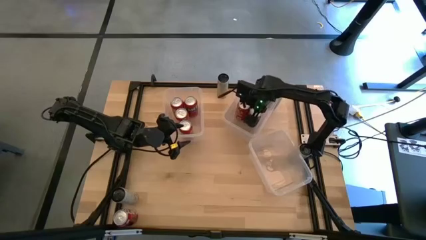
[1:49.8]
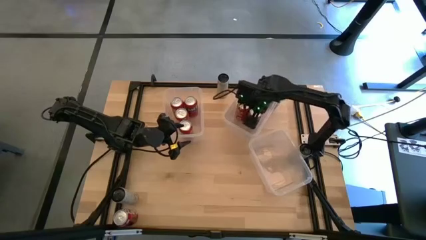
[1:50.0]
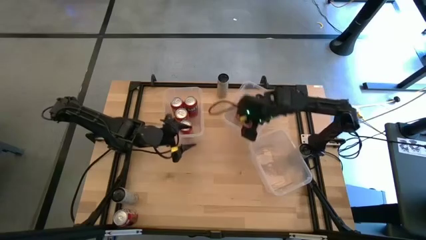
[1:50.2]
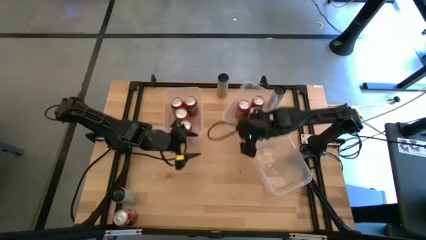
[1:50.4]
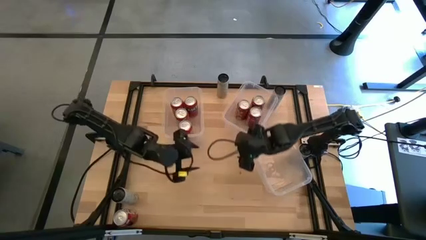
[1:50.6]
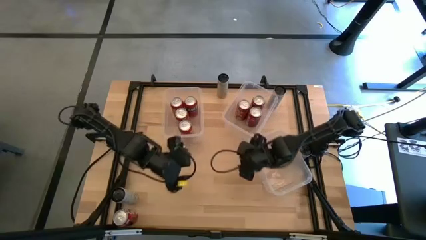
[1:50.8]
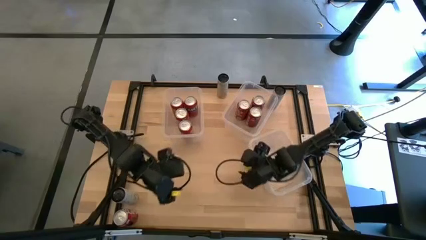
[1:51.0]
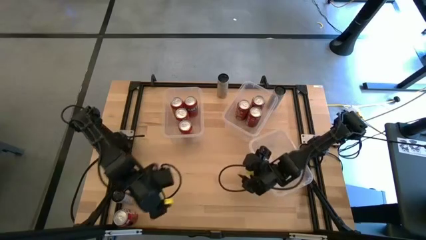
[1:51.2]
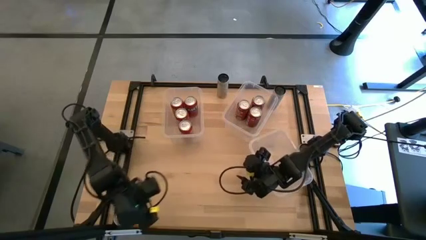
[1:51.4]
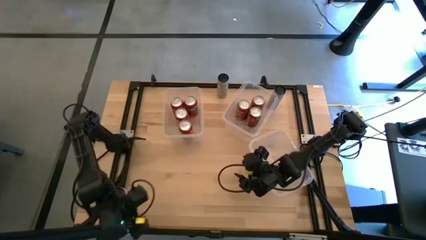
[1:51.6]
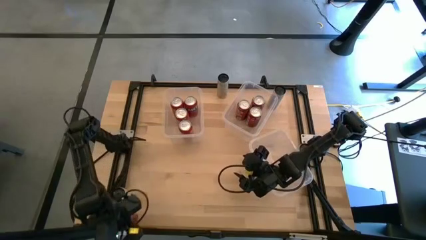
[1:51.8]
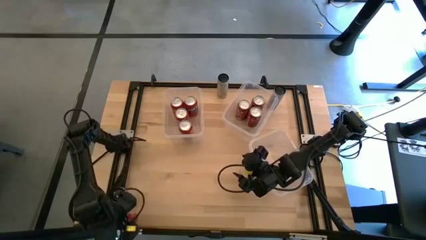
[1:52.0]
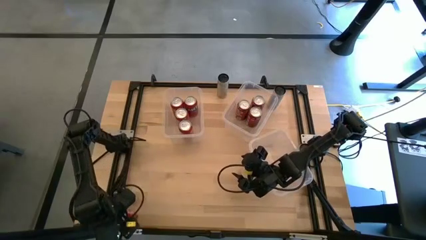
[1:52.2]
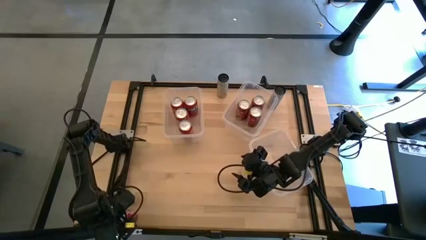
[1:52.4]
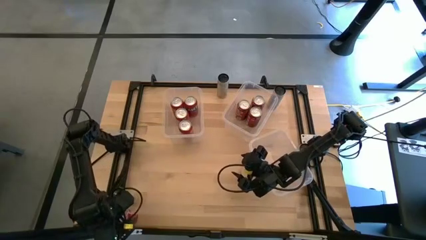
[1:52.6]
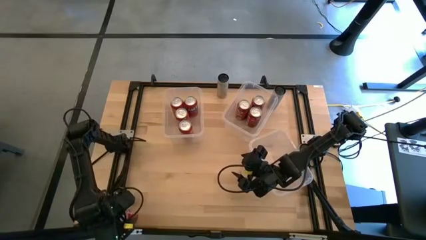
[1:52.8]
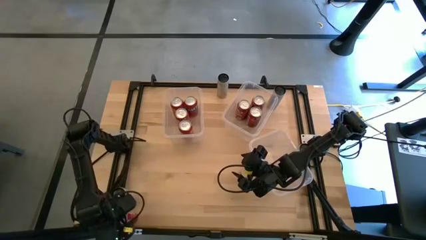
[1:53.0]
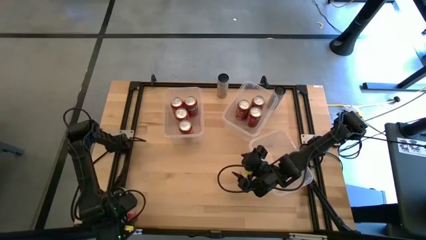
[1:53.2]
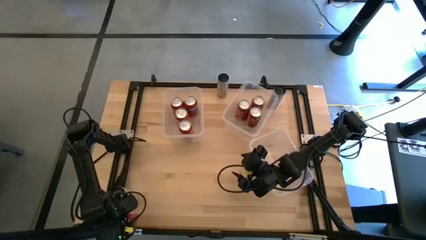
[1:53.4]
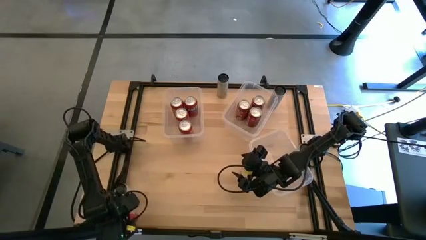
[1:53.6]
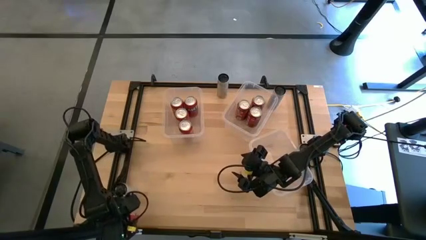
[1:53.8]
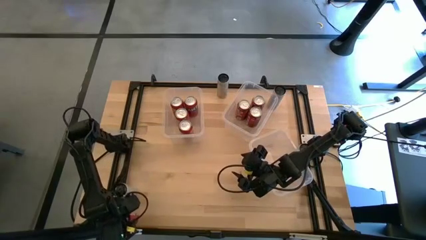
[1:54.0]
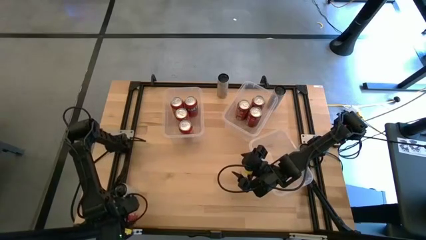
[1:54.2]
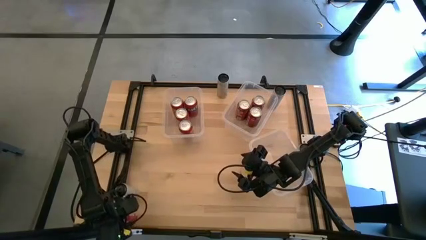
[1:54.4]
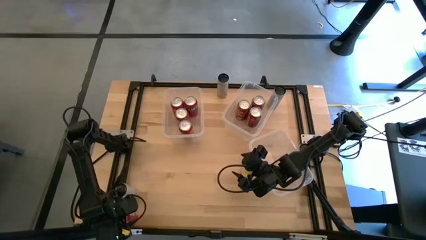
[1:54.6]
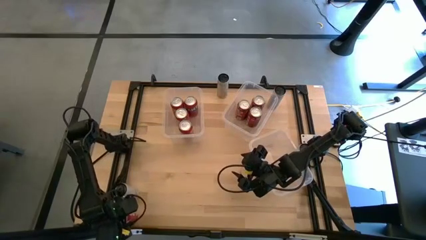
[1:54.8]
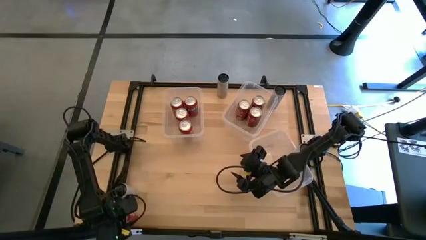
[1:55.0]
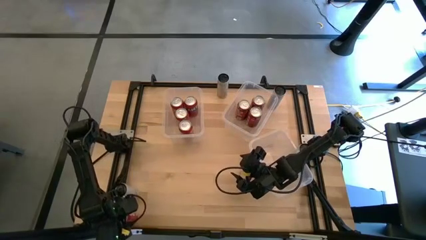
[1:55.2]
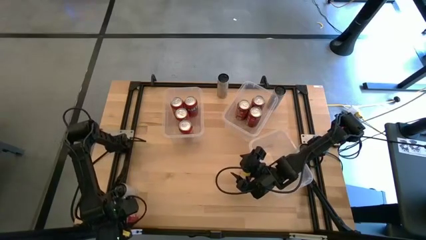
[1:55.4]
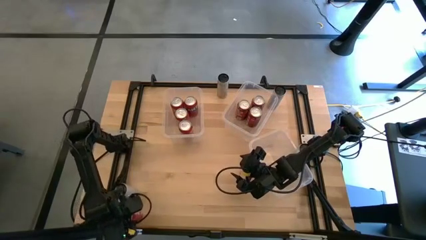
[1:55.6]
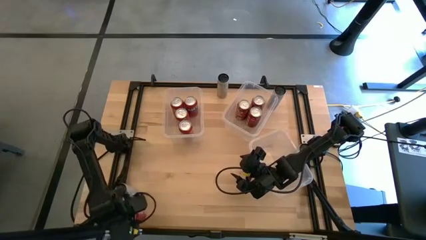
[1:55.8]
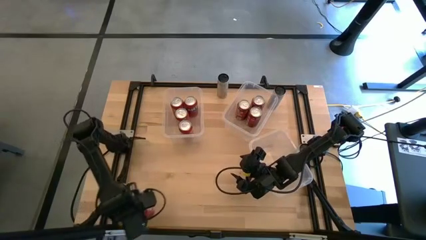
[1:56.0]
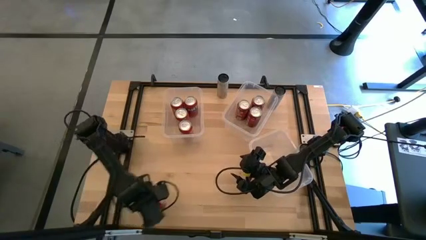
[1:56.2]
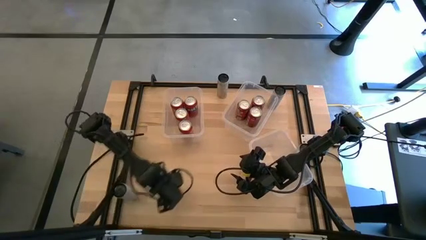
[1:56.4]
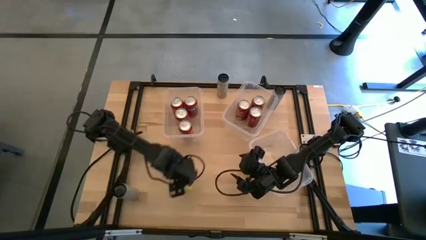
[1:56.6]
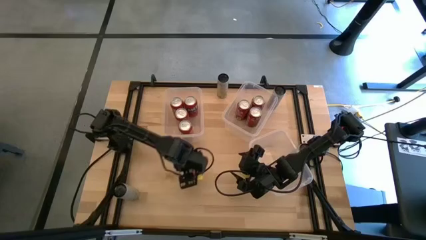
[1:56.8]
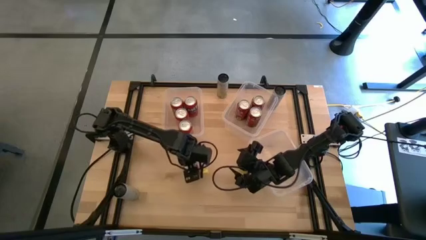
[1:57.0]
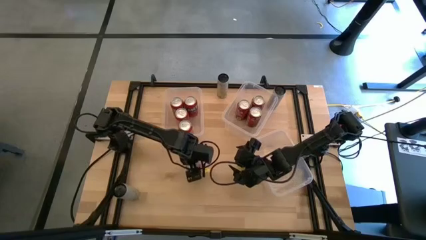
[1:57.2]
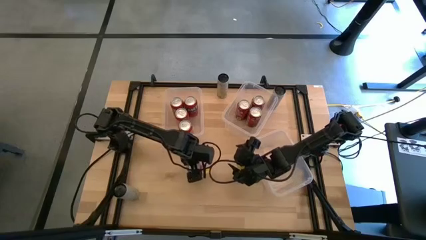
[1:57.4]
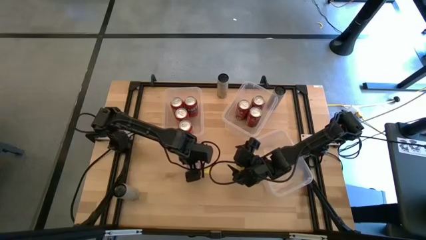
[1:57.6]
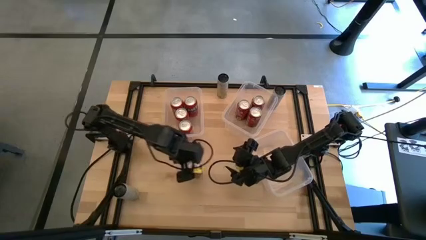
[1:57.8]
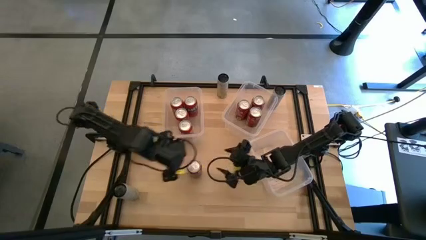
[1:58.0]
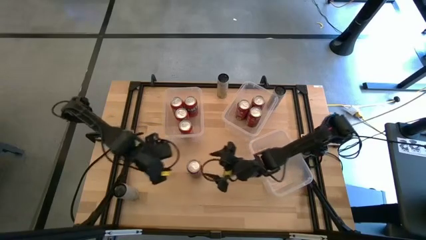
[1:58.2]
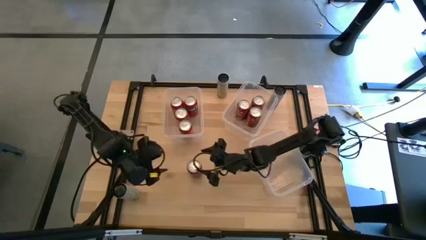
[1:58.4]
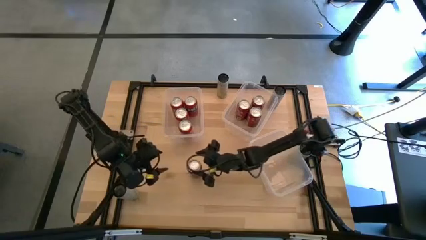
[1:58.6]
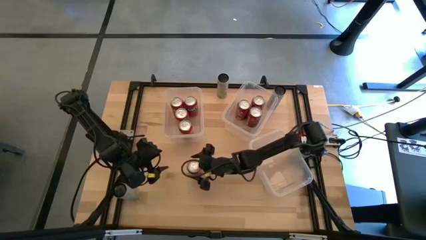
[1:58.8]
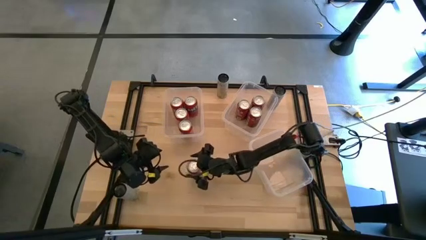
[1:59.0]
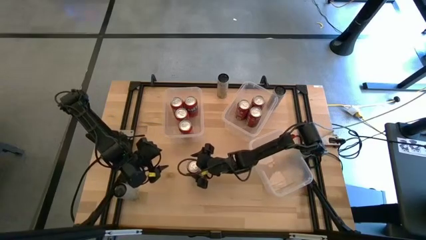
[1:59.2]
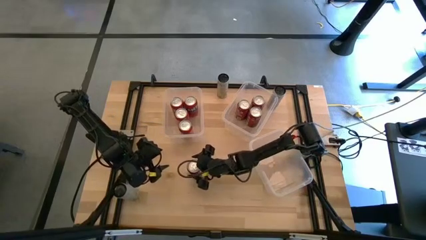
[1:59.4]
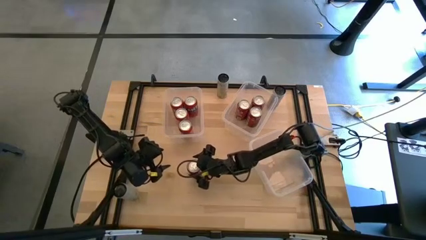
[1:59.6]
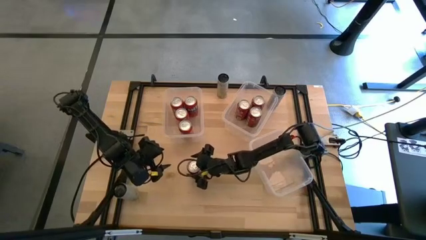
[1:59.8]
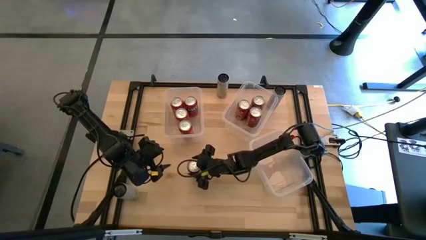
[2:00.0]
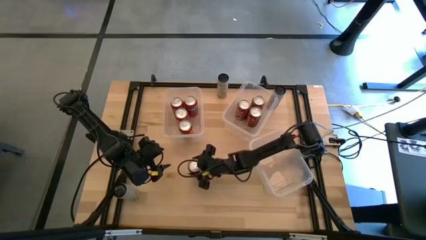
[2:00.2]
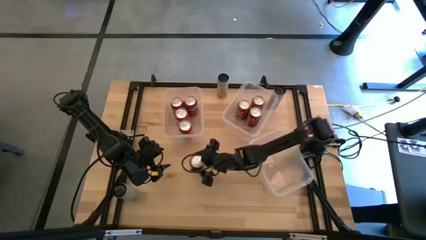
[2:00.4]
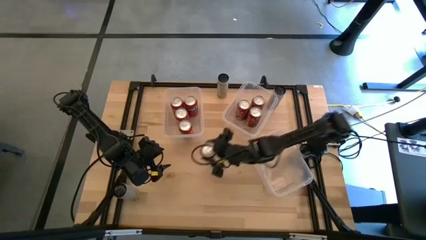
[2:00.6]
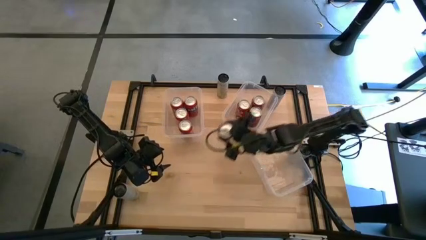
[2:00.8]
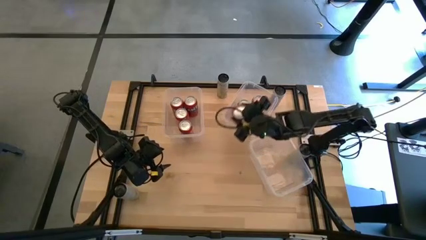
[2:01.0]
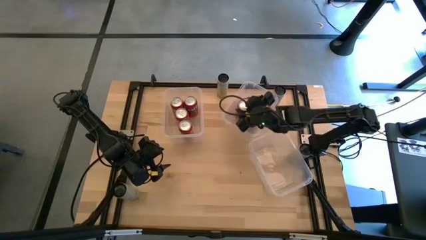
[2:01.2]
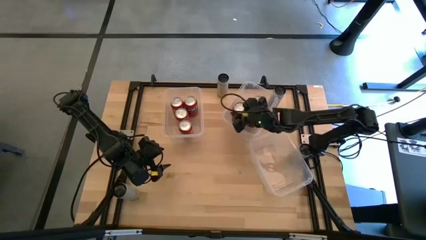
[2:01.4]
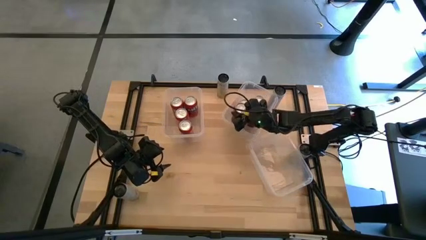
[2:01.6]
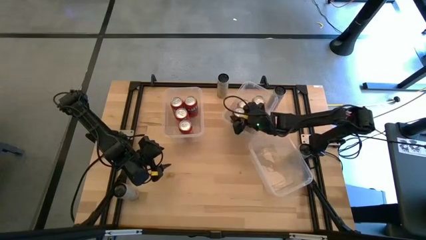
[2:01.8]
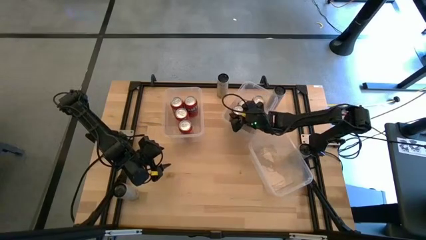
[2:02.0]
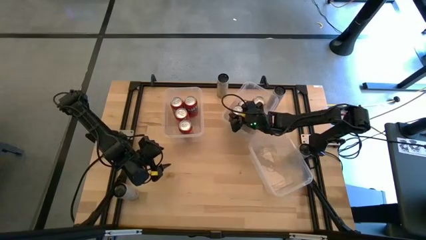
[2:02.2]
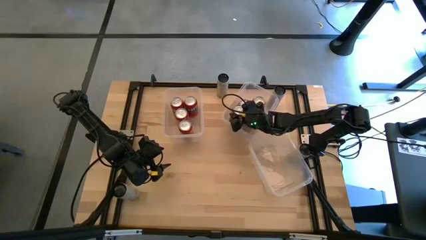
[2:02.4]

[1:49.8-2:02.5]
Task: Sort soda cans
Put the red-white soda can into the top right transparent bin

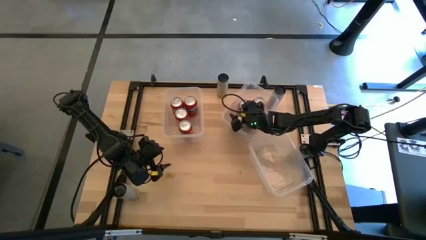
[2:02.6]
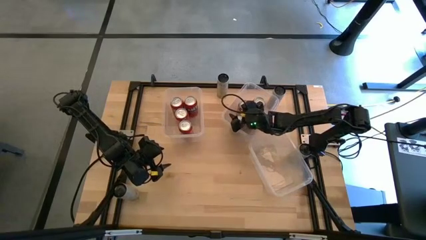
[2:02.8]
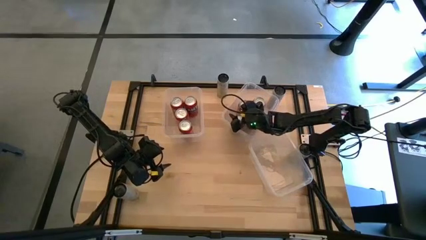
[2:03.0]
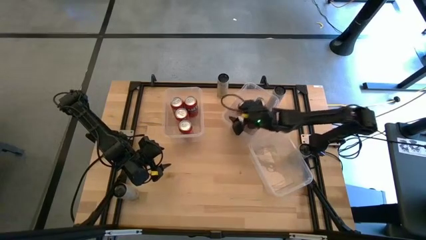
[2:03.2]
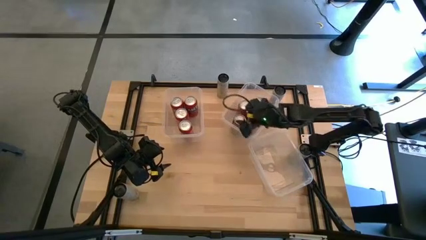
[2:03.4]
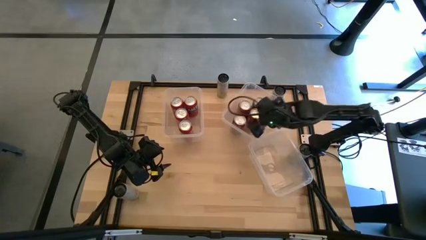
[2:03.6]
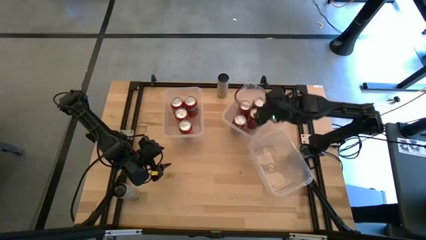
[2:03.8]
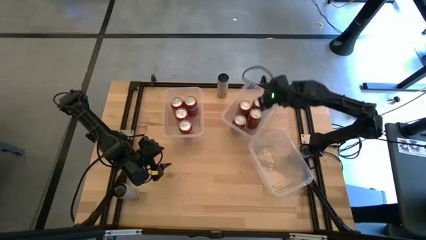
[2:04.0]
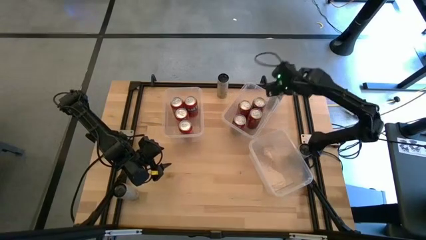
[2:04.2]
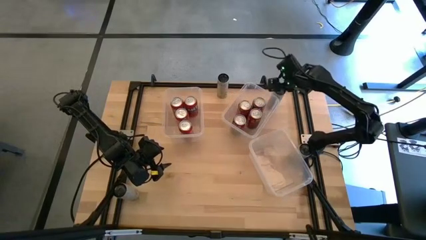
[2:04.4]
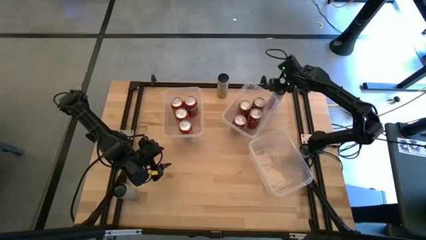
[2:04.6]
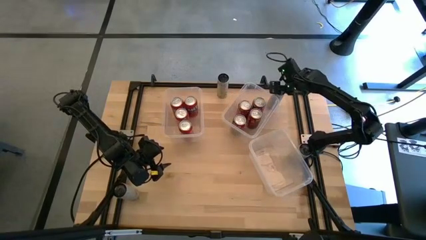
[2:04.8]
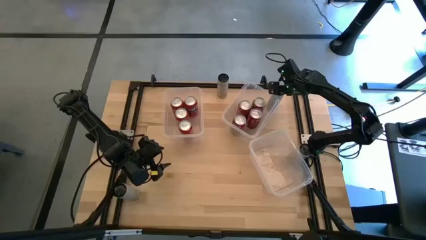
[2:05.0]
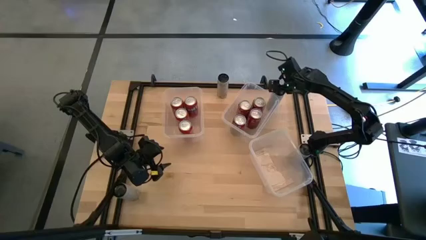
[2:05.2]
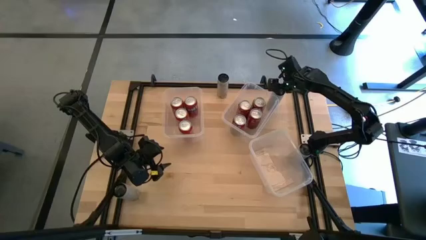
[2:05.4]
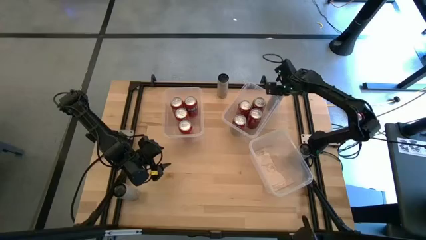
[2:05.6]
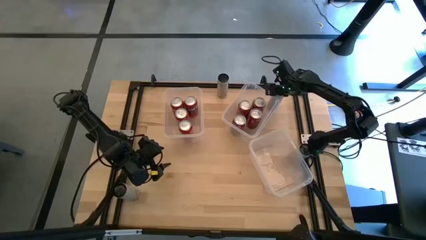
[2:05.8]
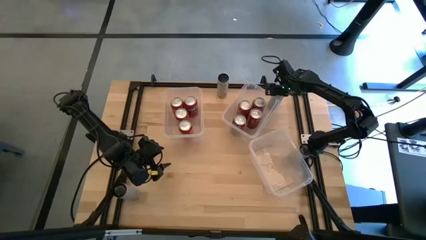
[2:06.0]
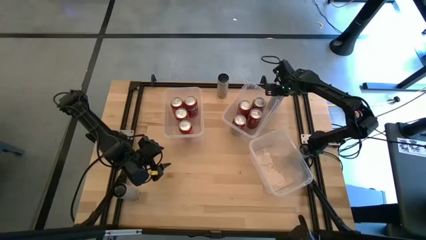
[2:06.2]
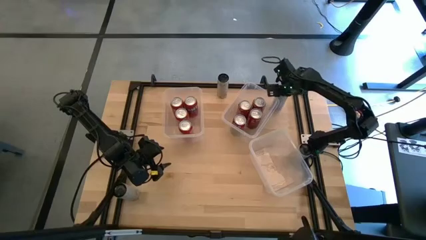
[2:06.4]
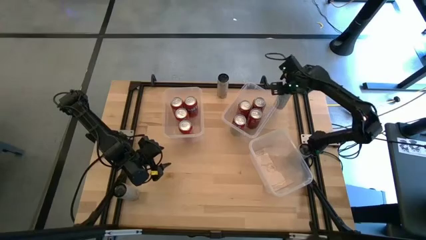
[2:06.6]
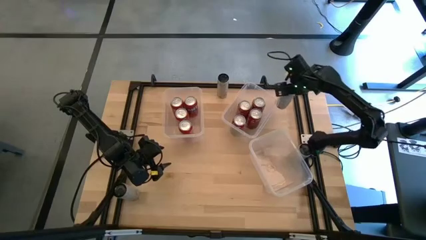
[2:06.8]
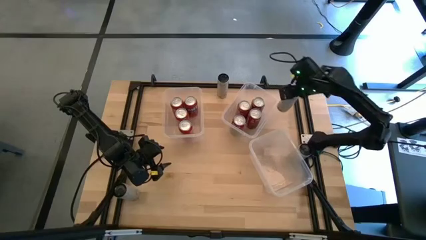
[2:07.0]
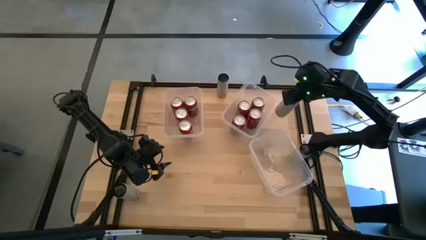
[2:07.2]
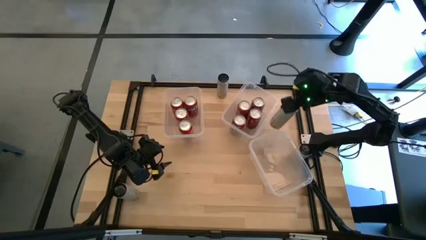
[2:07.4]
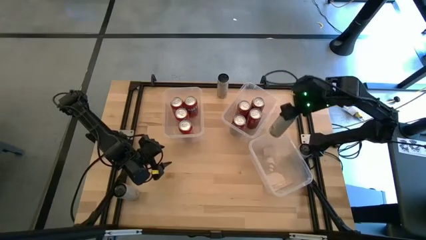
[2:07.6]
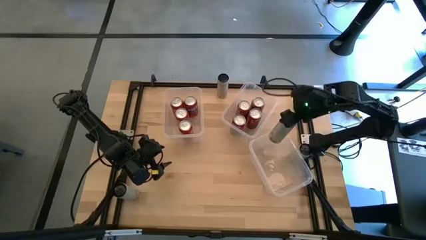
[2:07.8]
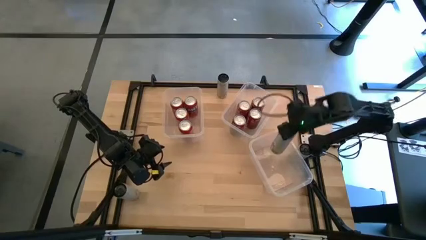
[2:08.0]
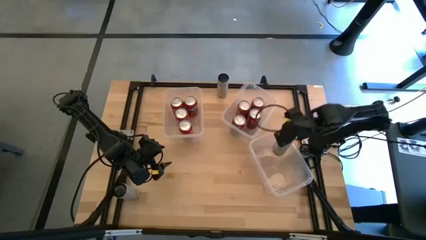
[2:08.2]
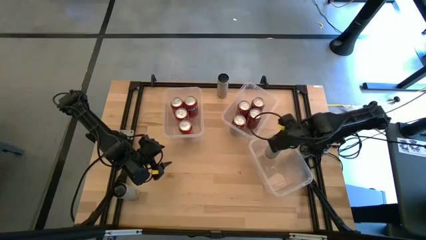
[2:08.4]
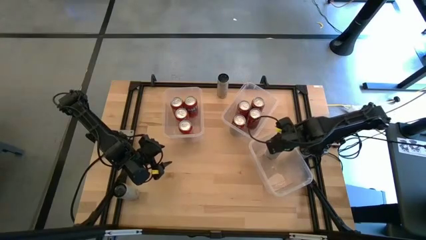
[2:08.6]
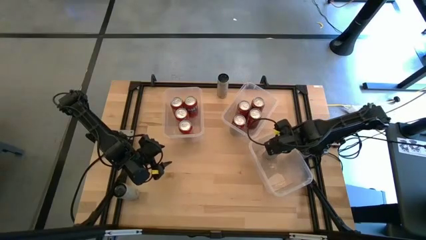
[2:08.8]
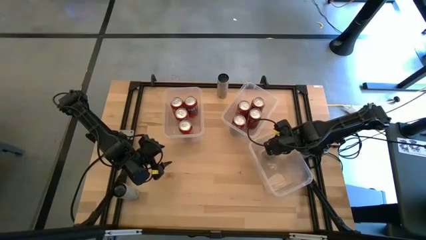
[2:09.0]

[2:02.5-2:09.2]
Put the white-yellow soda can into the bottom transparent bin
